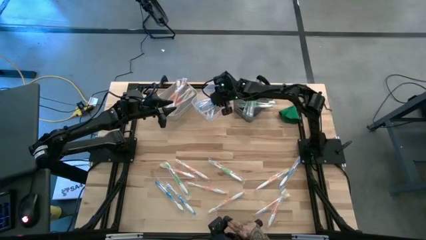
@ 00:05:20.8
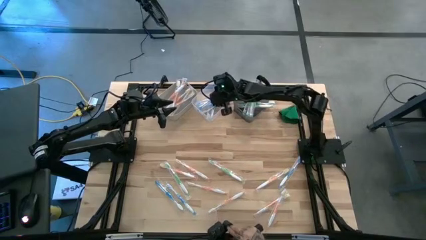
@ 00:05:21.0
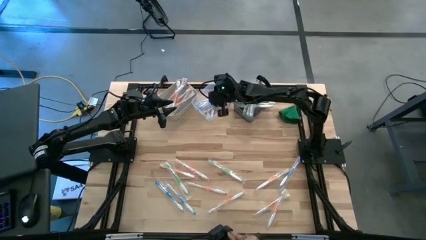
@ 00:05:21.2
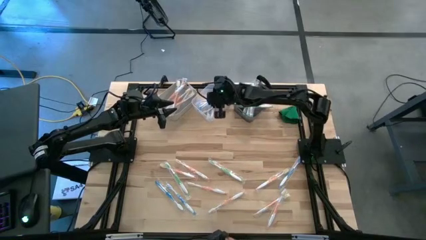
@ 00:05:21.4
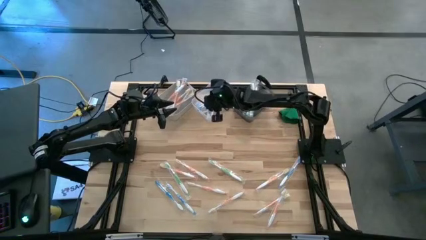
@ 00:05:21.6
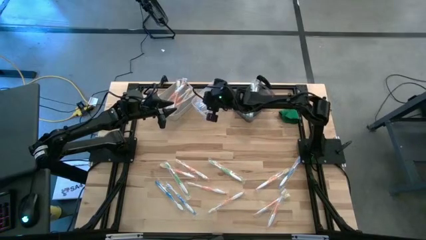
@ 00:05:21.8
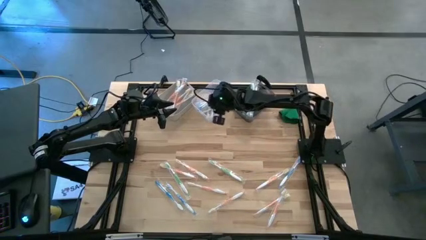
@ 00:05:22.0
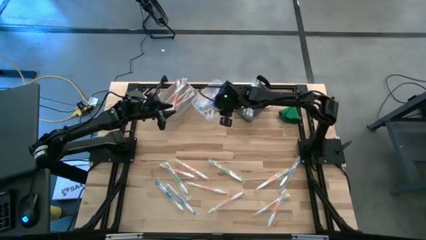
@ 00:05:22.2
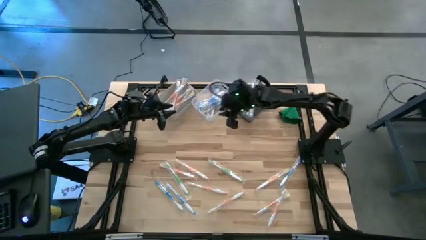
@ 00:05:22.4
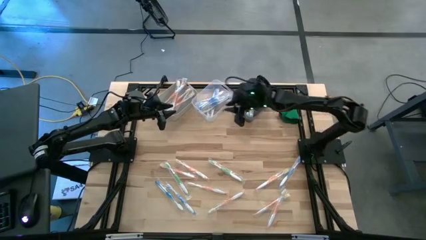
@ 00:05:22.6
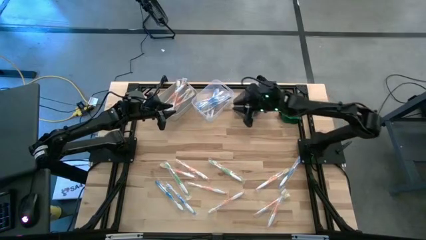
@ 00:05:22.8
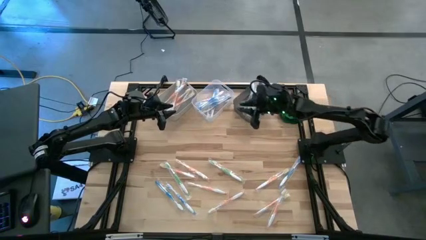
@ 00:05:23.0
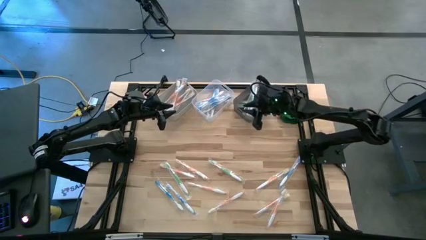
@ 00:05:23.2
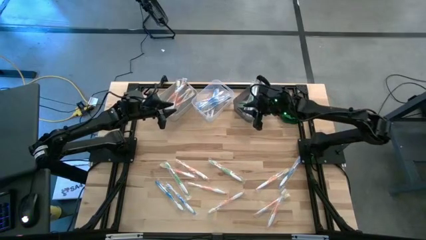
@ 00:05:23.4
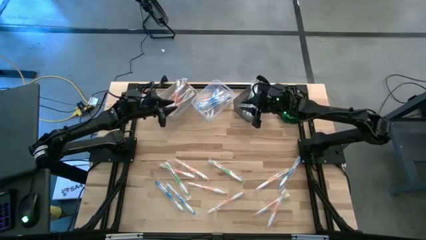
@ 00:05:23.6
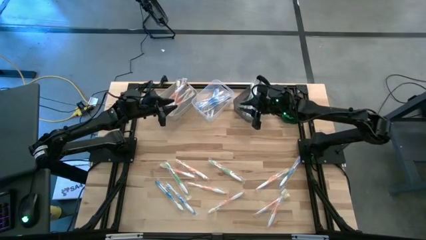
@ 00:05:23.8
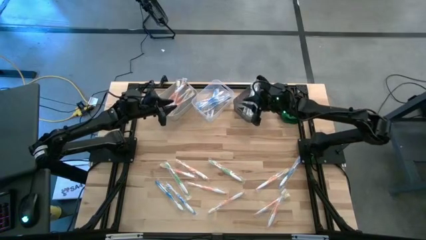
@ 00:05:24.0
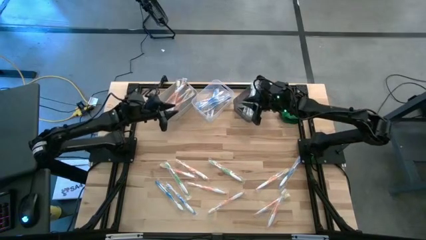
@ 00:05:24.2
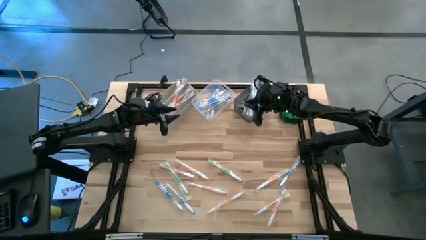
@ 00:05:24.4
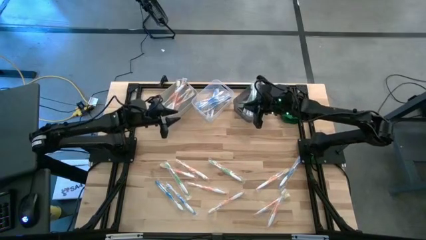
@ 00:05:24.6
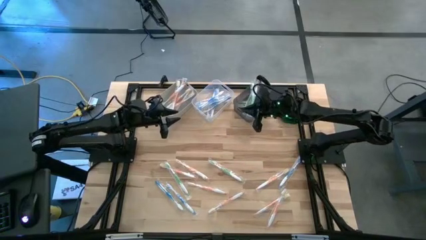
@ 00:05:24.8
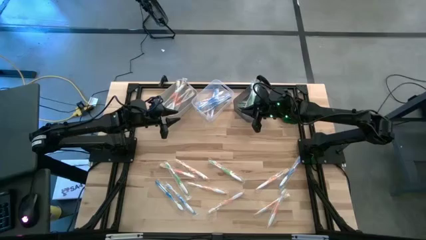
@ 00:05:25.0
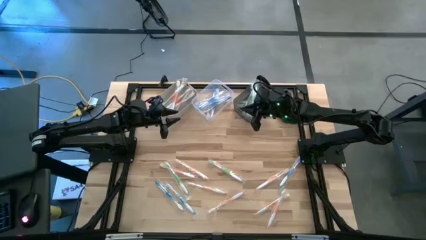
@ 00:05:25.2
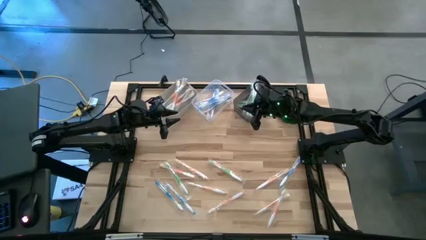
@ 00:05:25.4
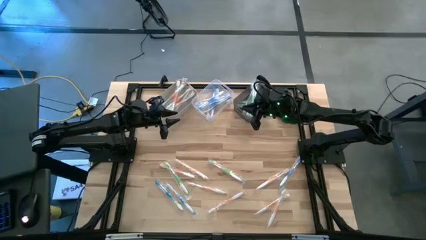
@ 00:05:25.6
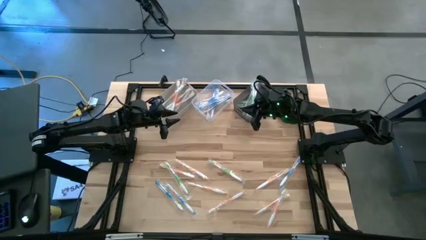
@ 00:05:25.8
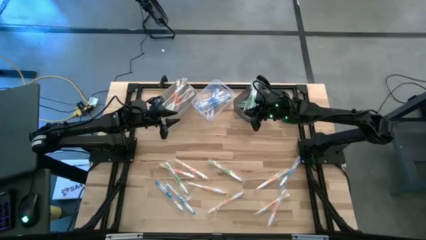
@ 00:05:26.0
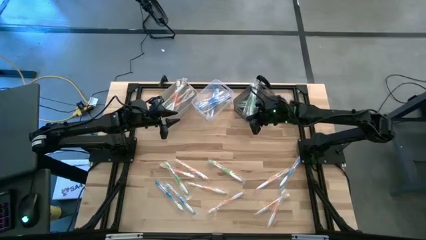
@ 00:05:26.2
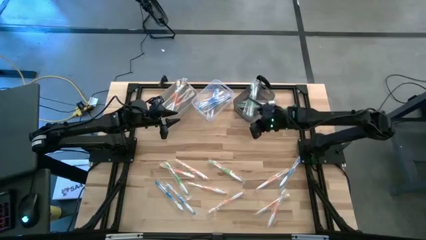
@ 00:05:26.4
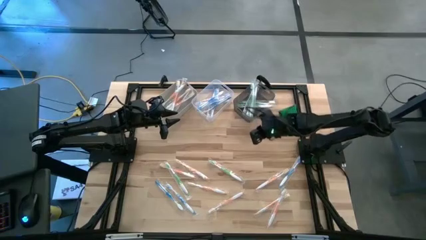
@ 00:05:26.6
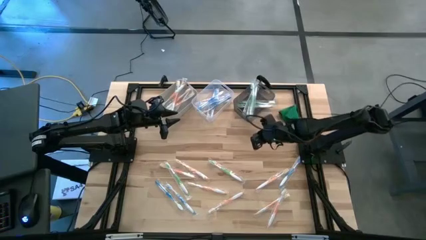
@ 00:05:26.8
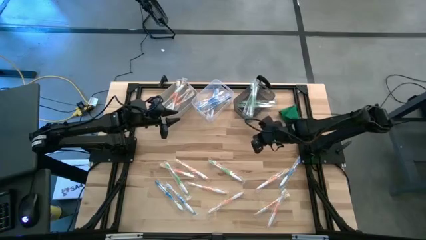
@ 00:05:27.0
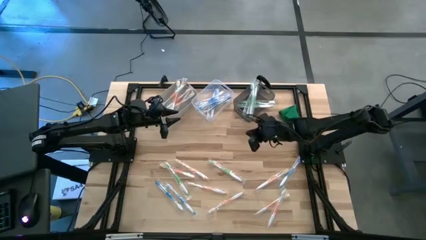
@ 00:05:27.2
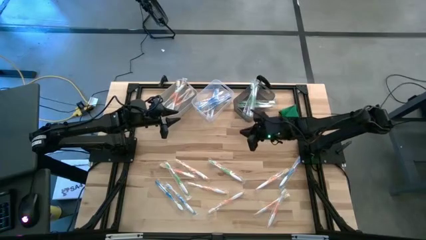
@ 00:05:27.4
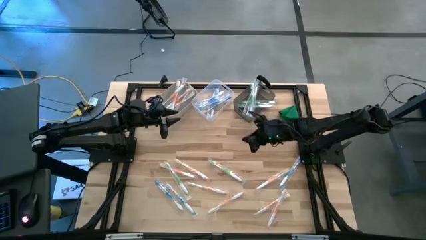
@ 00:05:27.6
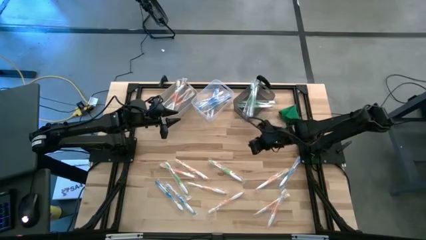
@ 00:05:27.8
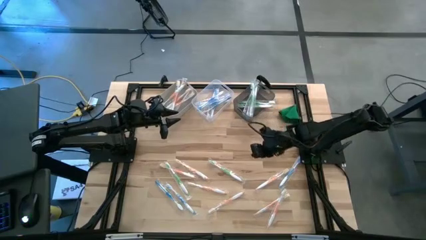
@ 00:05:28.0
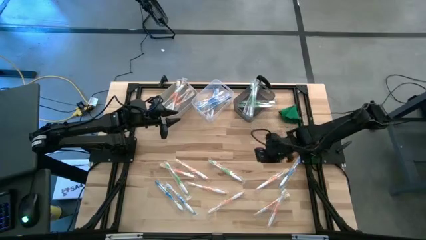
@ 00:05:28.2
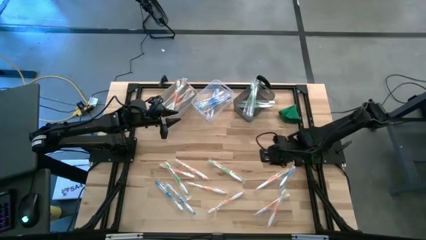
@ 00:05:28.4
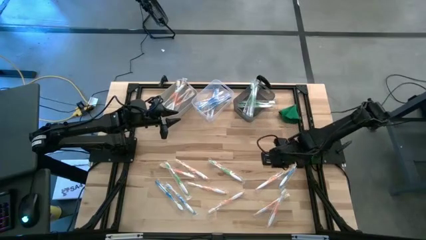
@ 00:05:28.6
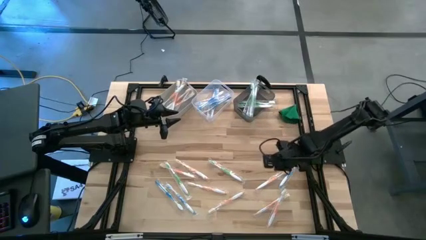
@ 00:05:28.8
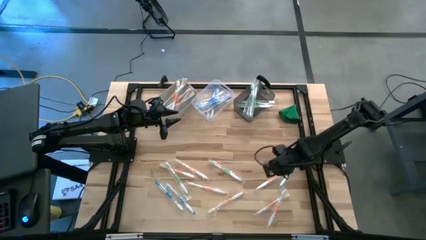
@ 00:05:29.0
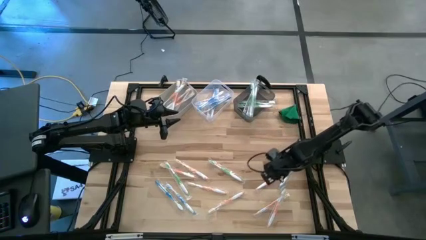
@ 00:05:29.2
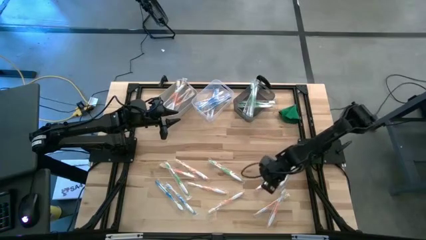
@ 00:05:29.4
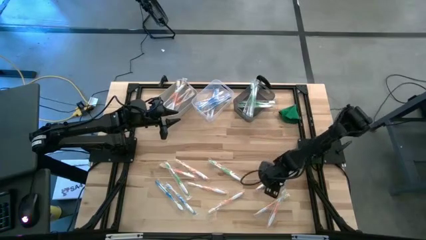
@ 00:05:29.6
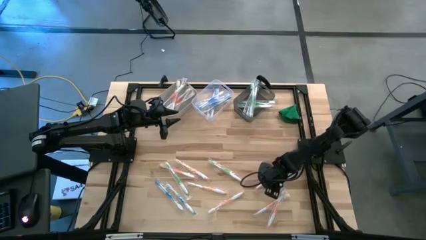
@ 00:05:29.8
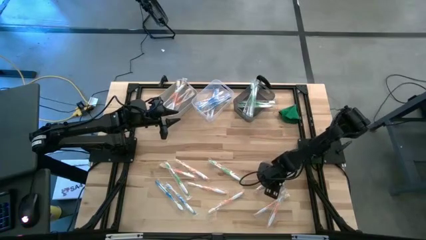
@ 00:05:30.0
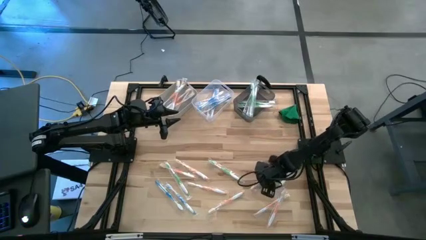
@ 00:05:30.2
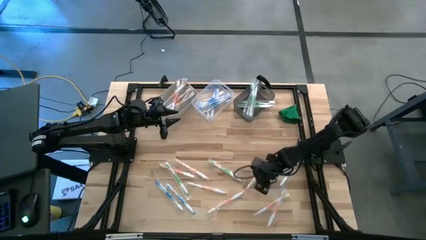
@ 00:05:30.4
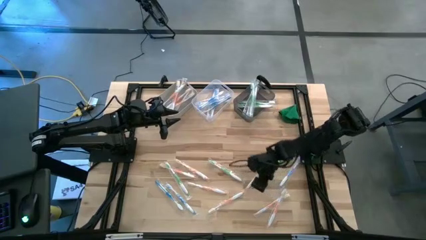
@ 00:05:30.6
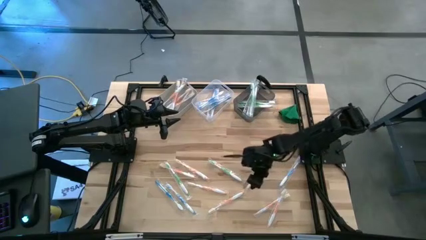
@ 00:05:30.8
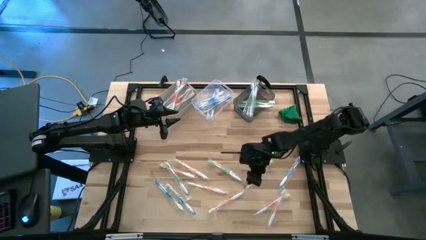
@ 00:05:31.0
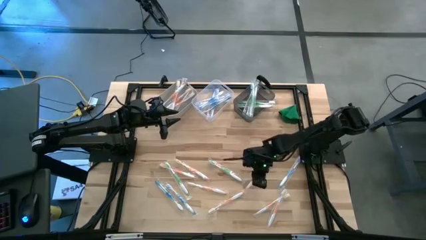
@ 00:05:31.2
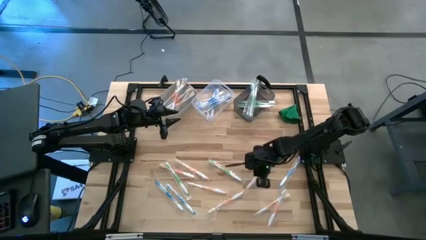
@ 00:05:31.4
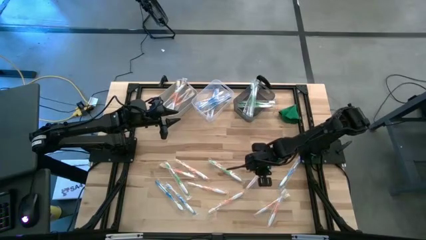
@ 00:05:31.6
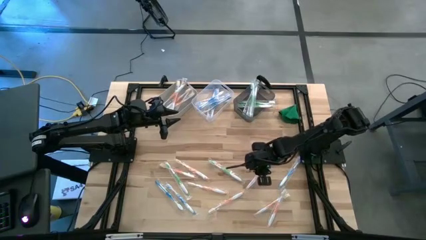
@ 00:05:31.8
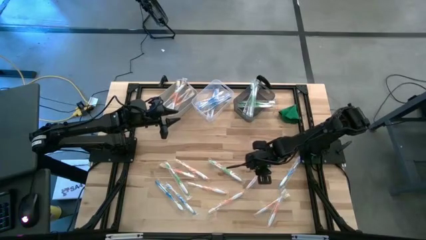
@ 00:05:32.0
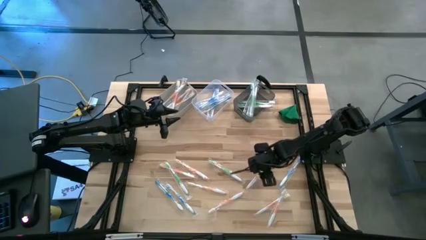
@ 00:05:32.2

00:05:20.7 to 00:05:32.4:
Task: Pick & Place Toothbrushes
Put the orange toothbrush into the white bin

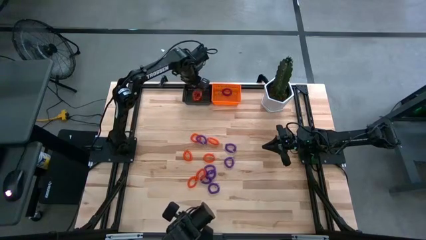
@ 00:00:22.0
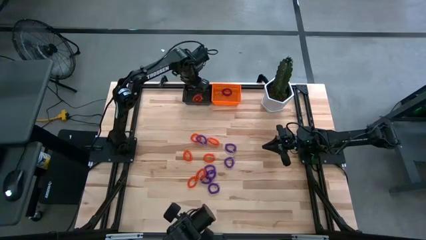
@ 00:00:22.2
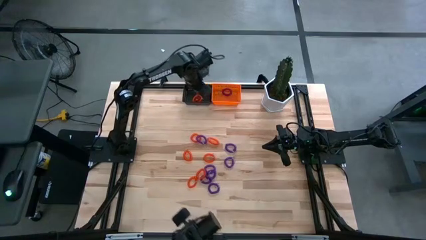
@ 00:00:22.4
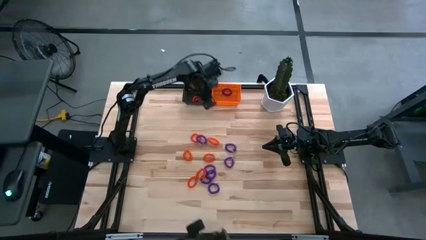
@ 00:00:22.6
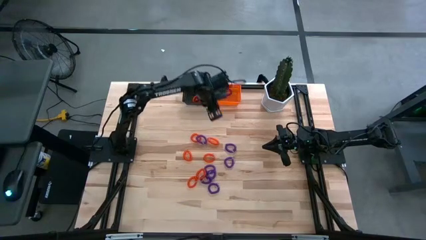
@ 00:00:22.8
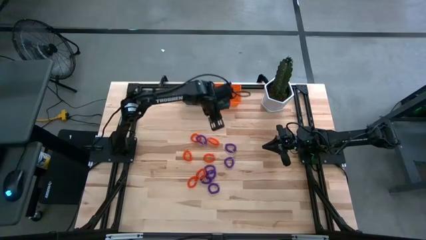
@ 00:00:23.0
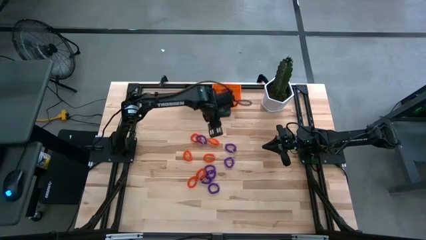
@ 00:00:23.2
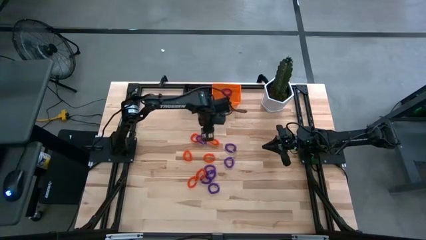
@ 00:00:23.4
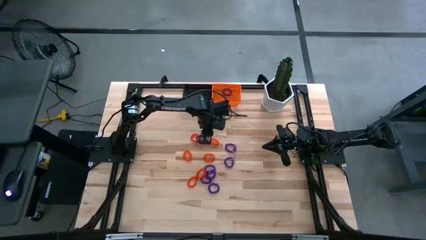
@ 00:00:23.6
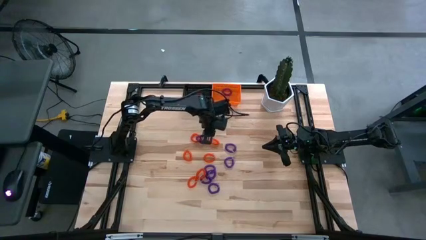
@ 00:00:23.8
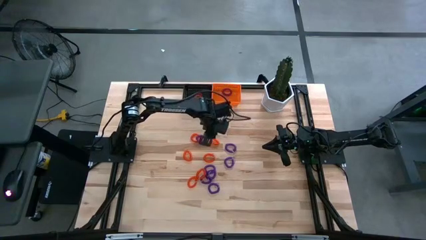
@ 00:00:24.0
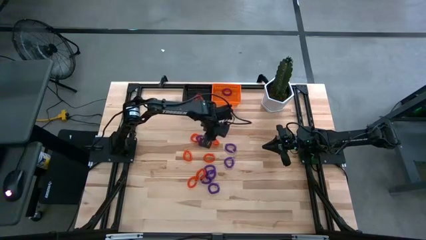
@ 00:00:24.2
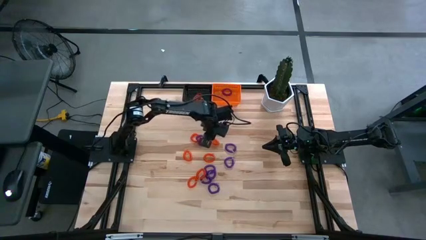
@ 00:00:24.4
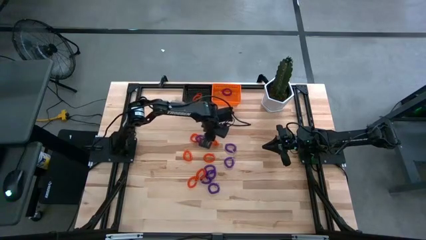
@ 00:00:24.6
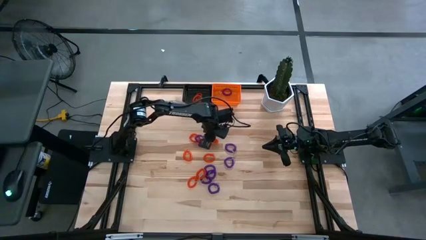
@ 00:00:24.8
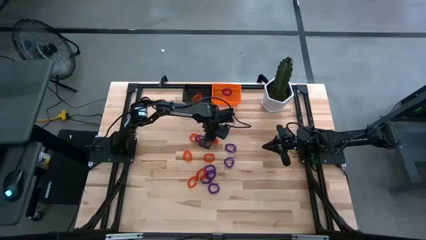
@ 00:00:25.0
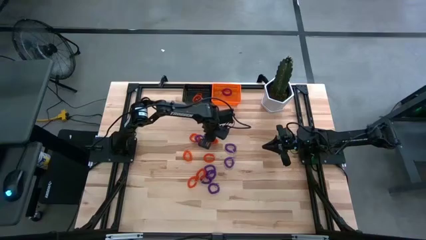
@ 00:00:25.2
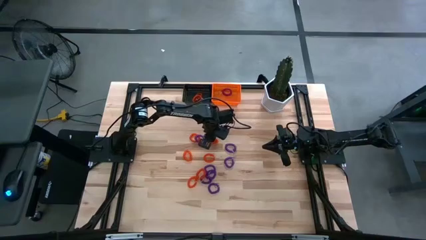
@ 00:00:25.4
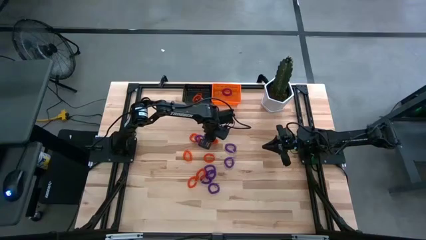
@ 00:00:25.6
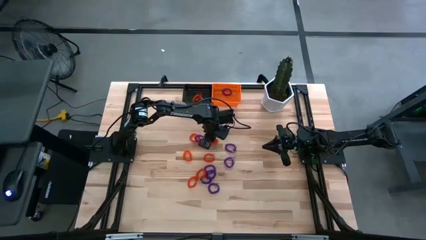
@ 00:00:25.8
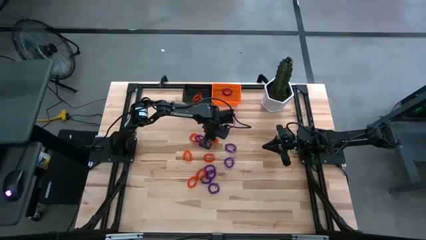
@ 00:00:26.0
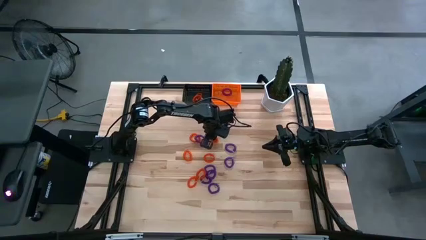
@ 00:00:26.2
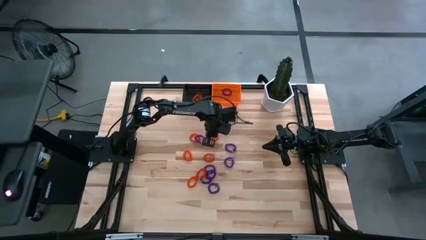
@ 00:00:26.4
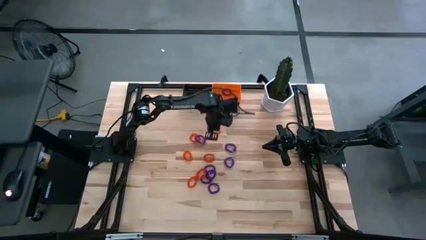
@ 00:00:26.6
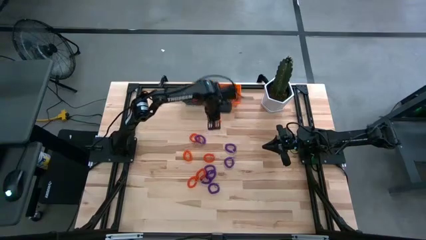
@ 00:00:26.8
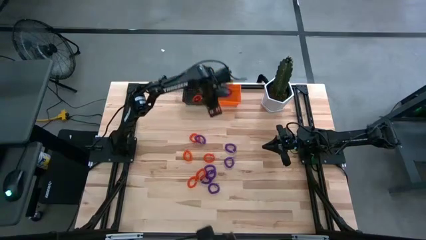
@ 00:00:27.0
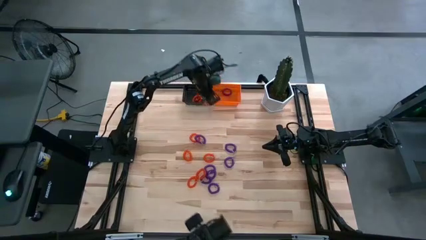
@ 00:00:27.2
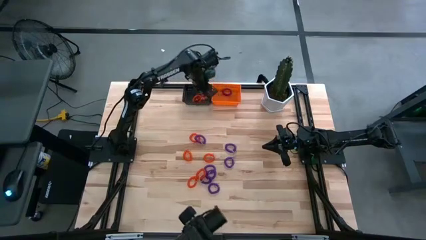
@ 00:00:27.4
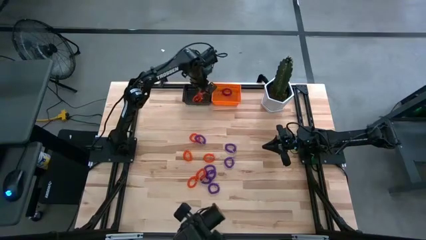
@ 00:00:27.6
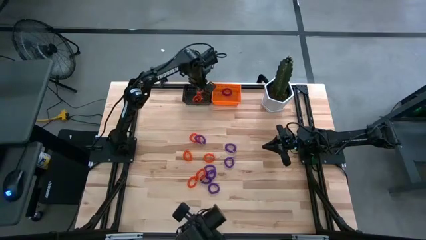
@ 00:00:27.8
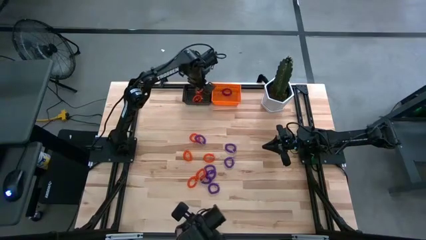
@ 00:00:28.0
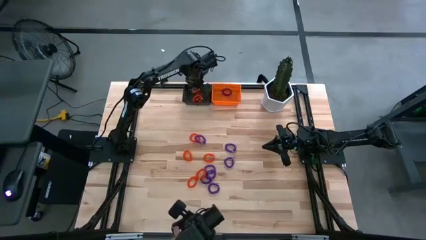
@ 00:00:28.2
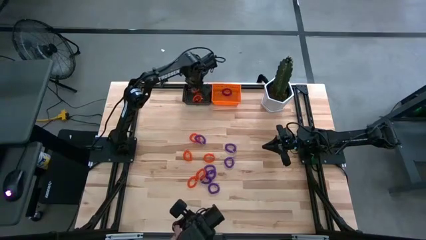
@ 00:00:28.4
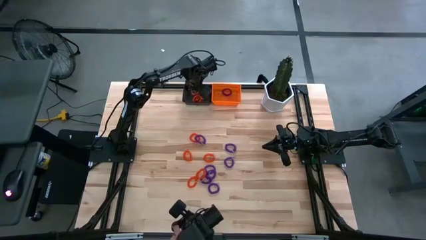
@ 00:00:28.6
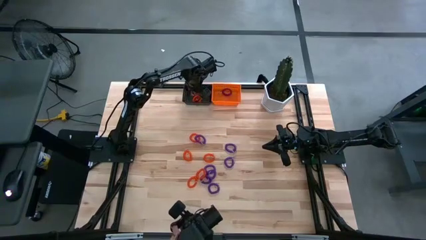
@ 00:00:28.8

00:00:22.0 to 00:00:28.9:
Task: Sort spring keychains into baskets
Put the orange spring keychain into the black basket
